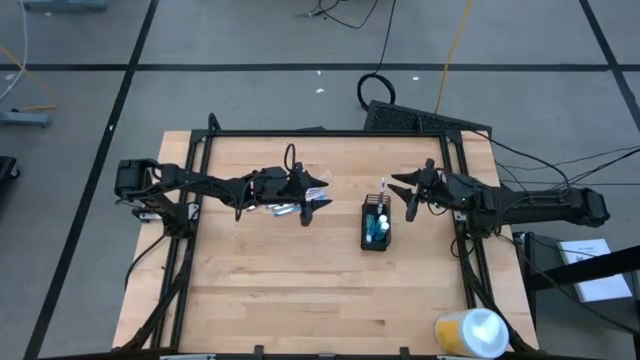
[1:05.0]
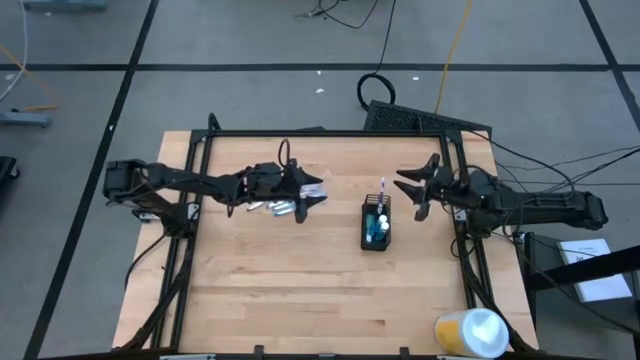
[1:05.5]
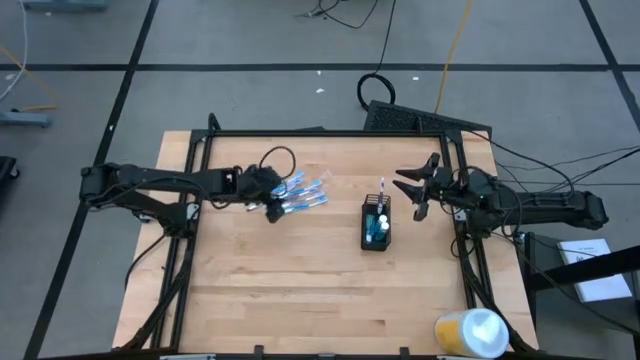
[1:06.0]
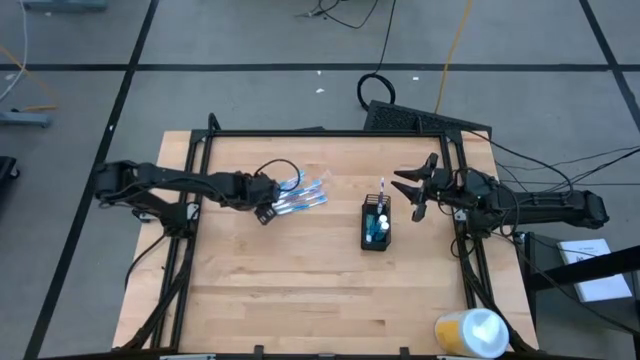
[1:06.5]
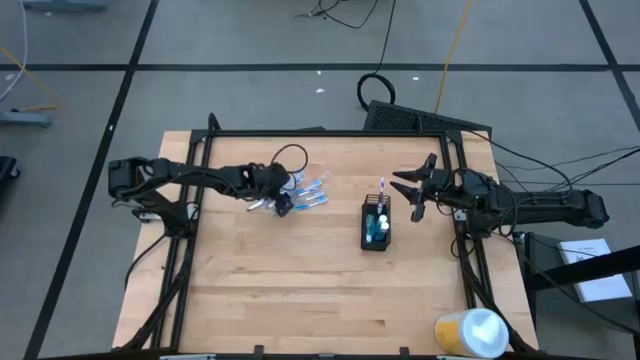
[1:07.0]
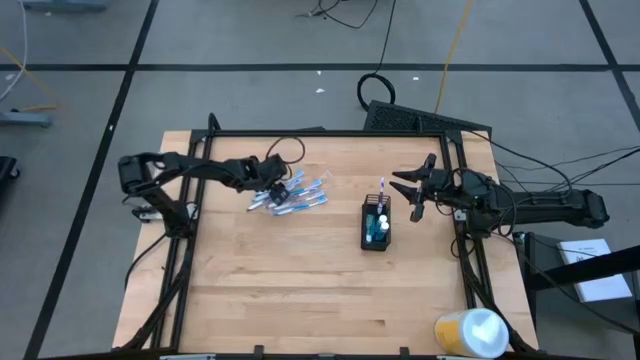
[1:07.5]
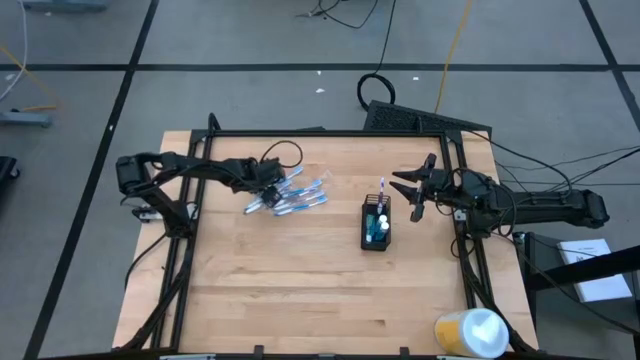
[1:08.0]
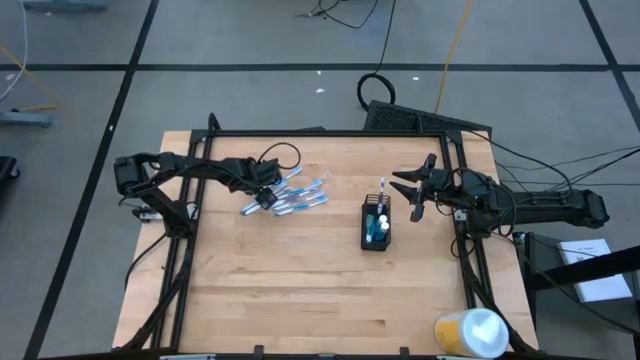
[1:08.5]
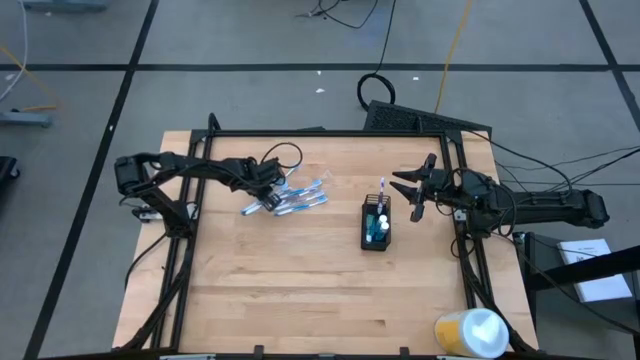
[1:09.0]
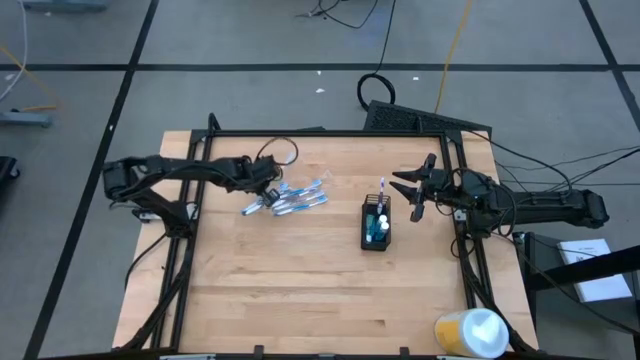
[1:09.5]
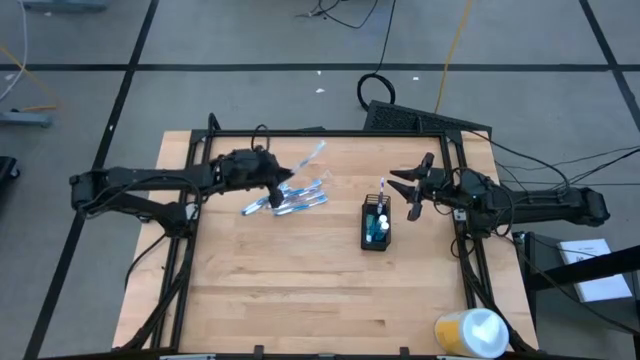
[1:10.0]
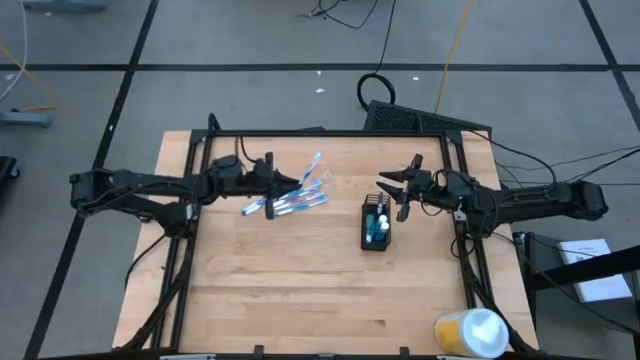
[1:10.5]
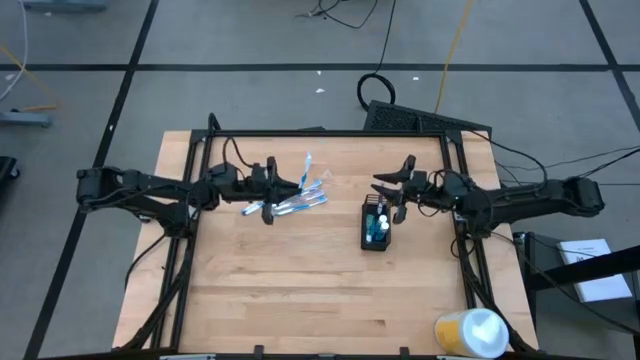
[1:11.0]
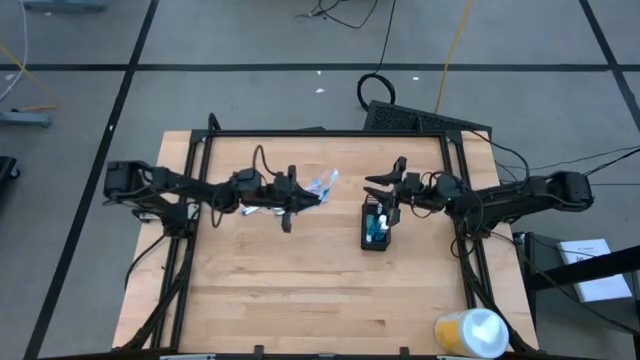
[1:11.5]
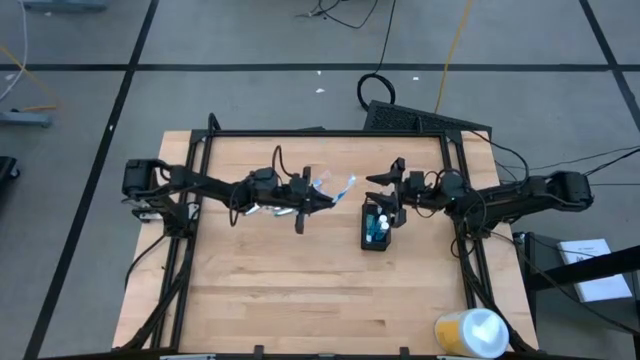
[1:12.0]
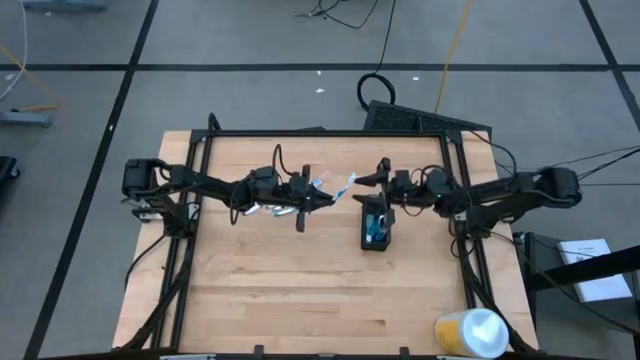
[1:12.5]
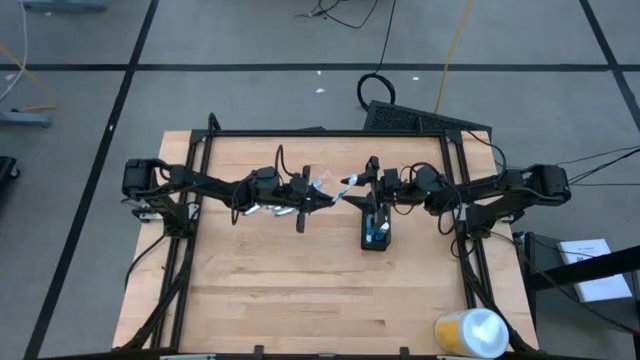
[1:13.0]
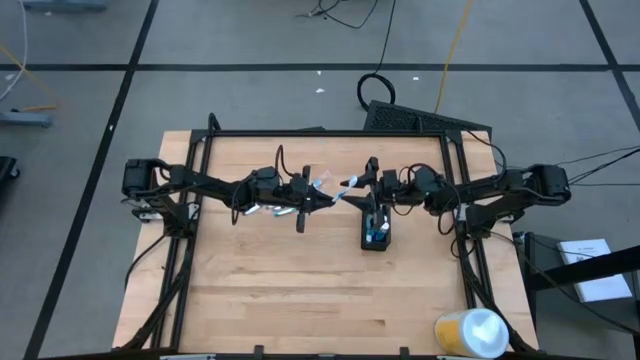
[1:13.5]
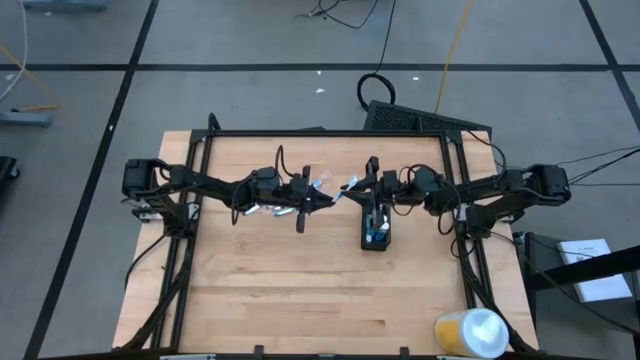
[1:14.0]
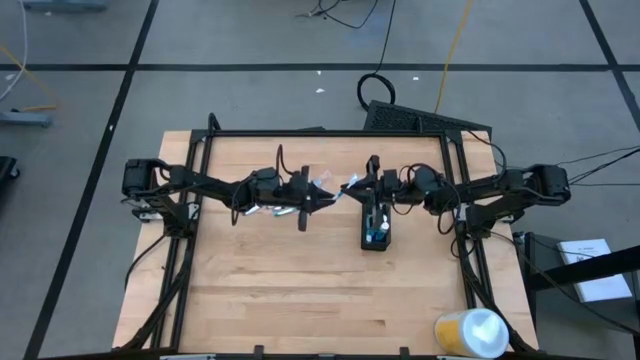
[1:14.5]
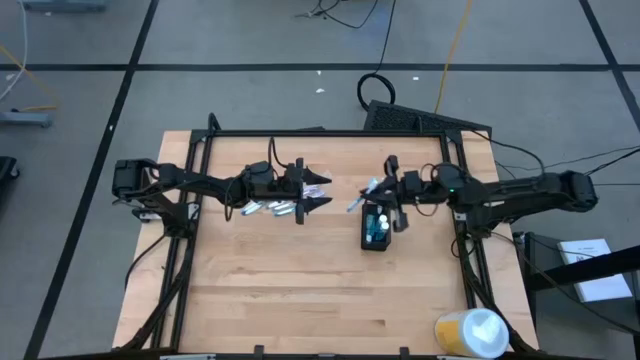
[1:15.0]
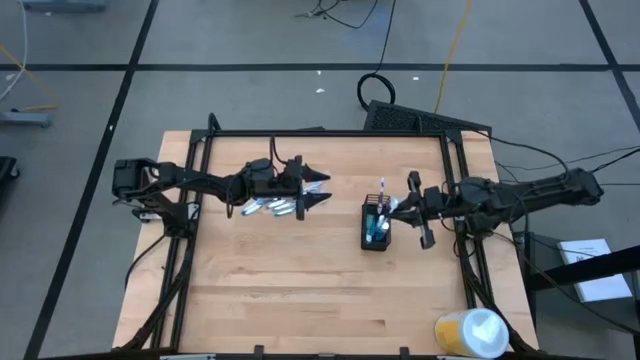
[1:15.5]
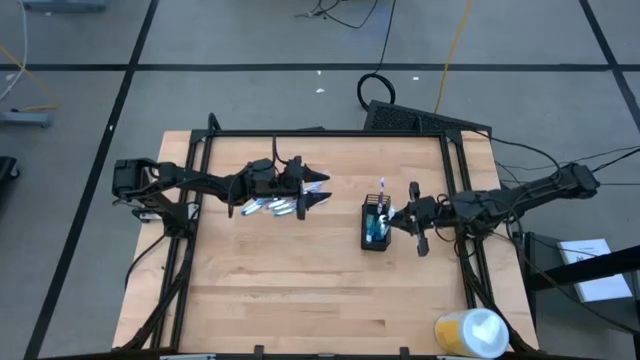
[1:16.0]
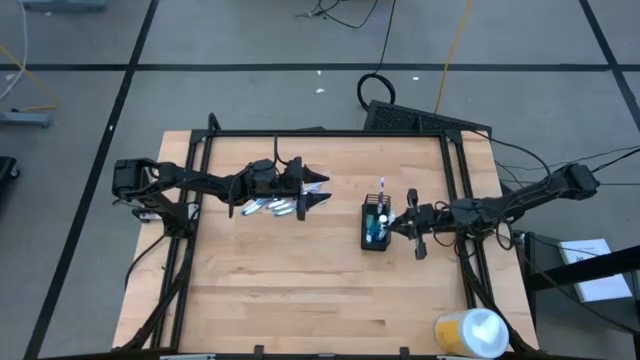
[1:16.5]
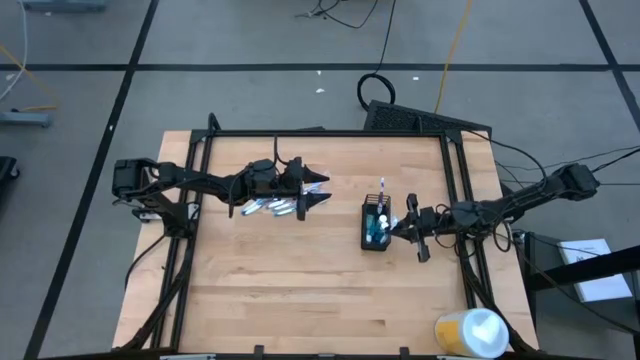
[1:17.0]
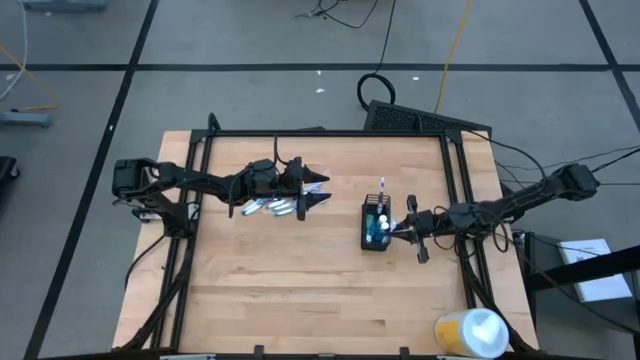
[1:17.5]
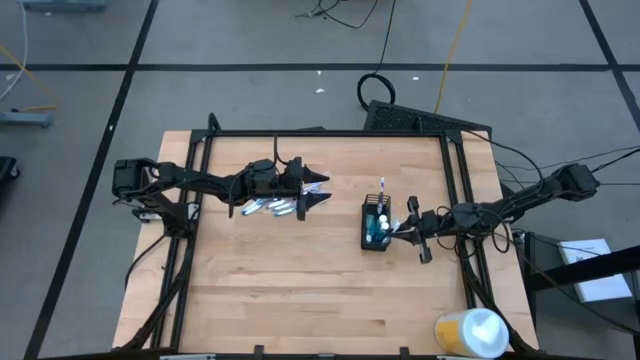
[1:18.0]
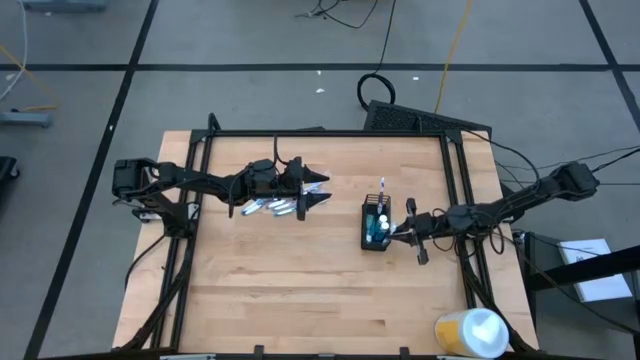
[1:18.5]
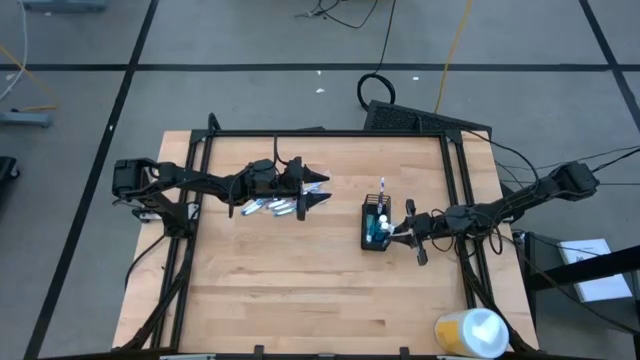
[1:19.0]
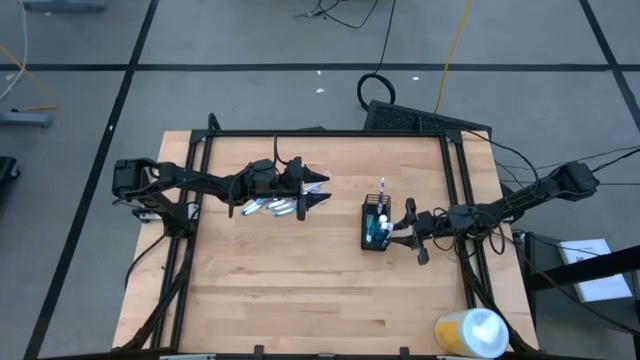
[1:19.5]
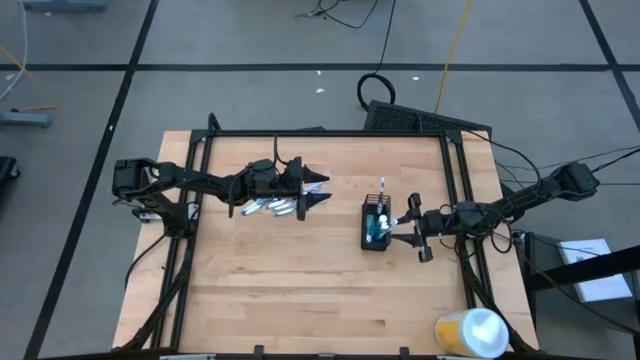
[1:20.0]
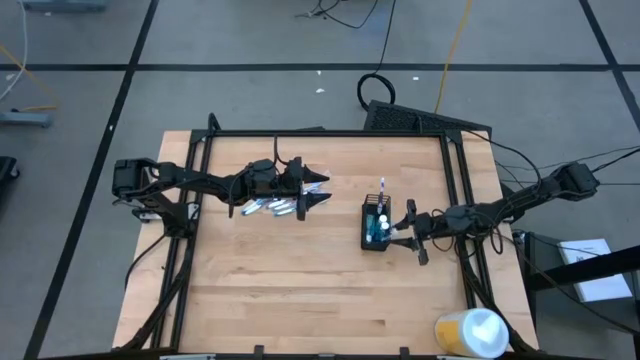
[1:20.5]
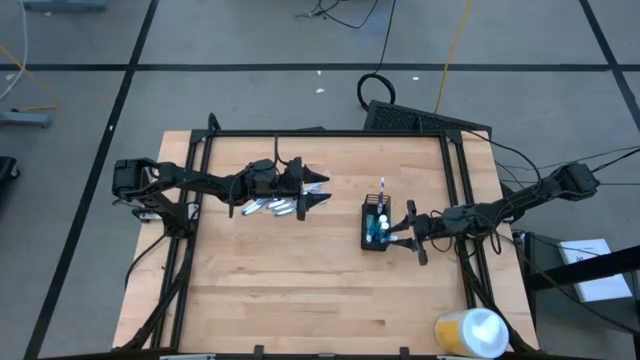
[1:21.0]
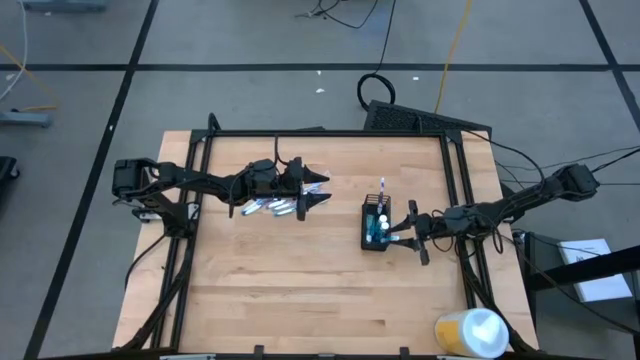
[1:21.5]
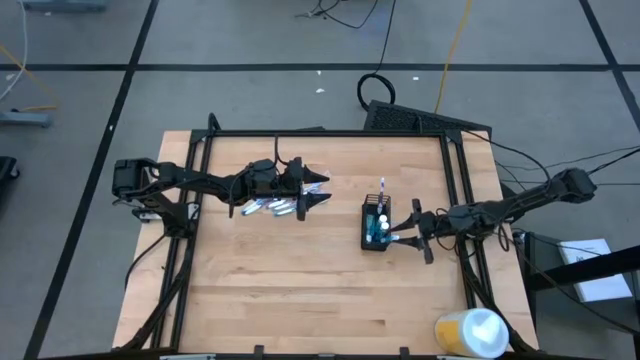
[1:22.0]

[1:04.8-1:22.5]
Task: Pick & Place toothbrushing station
Put the blue toothbrush into the bottom section of the mesh organizer

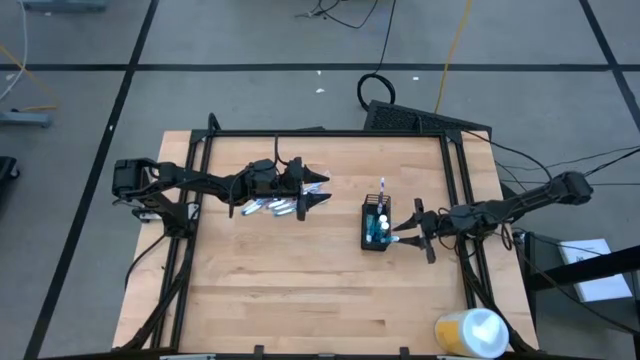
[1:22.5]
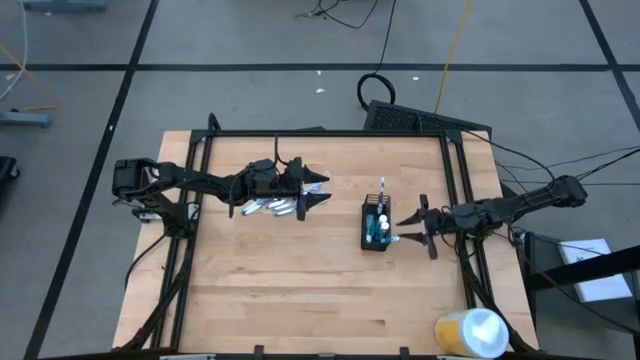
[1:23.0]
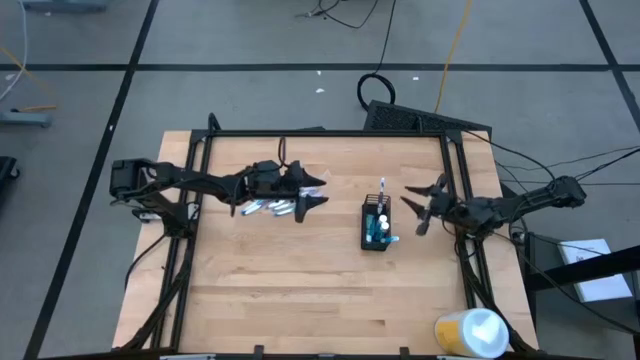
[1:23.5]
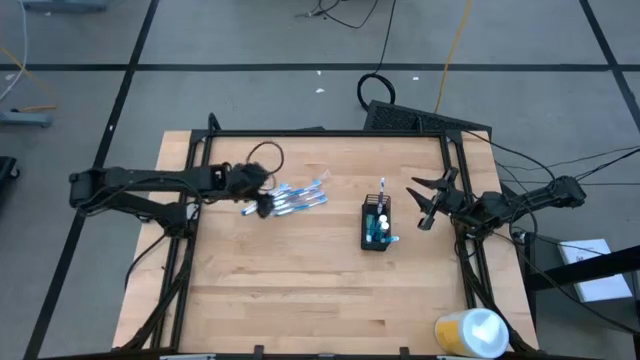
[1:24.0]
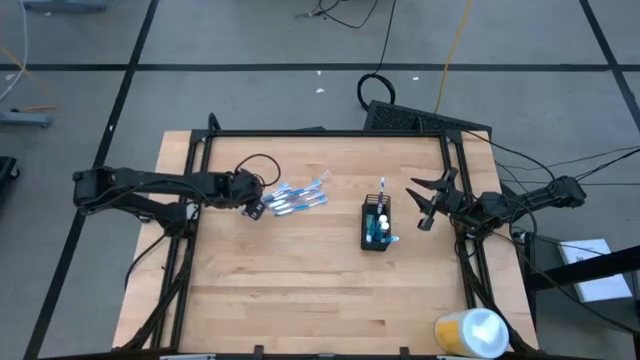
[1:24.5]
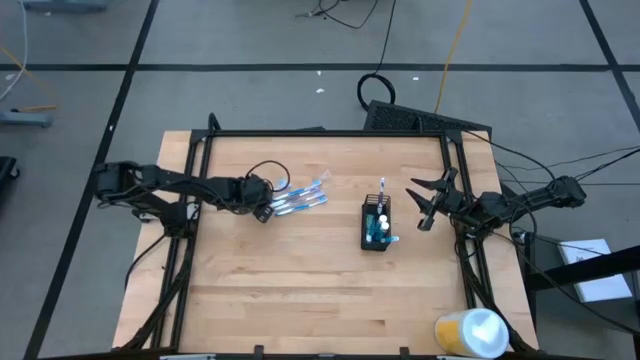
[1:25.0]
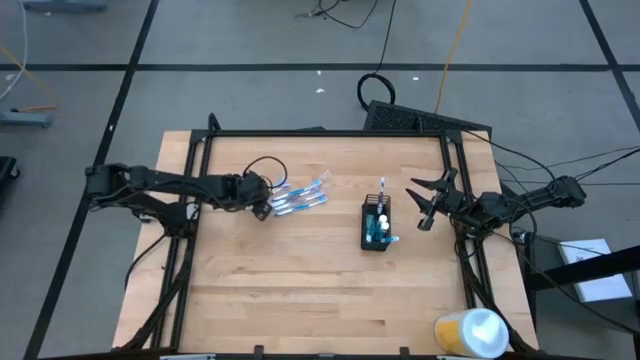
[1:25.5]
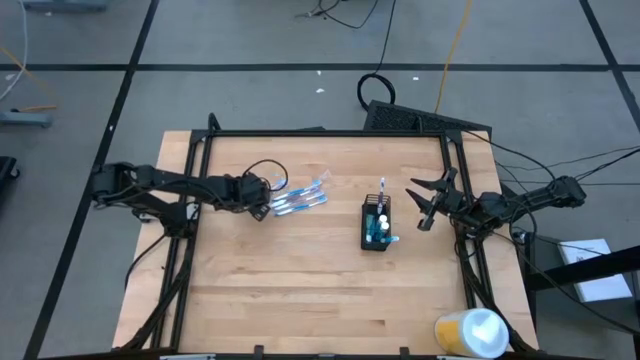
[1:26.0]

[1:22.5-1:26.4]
Put the purple toothbrush into the top section of the mesh organizer
